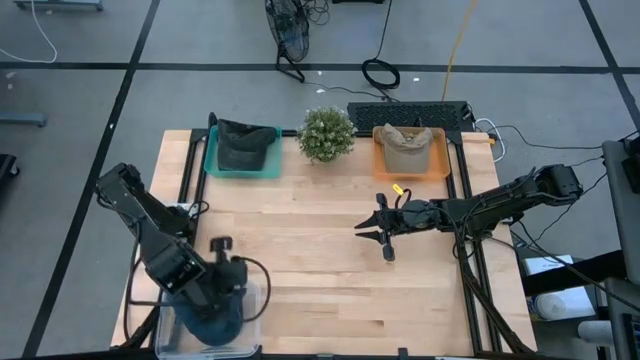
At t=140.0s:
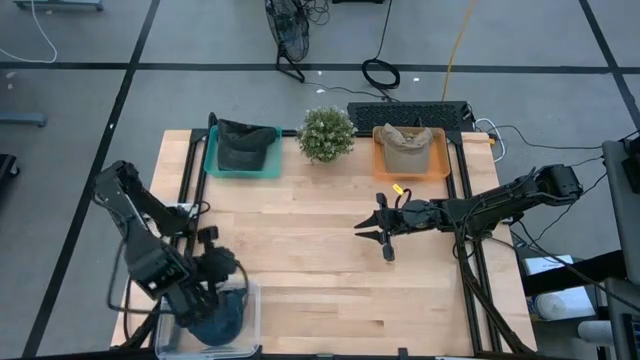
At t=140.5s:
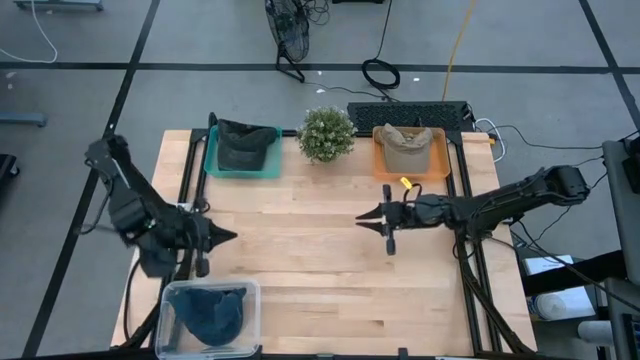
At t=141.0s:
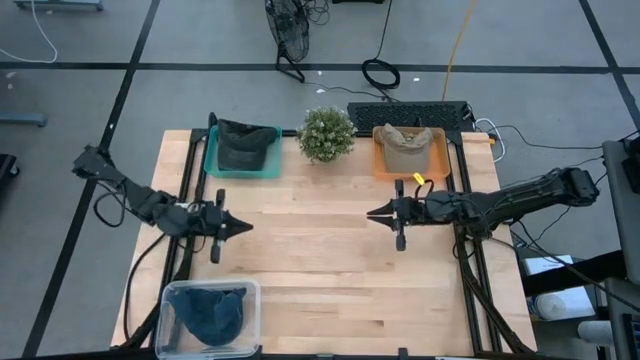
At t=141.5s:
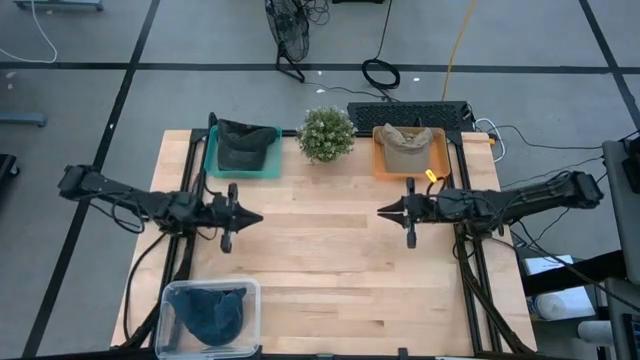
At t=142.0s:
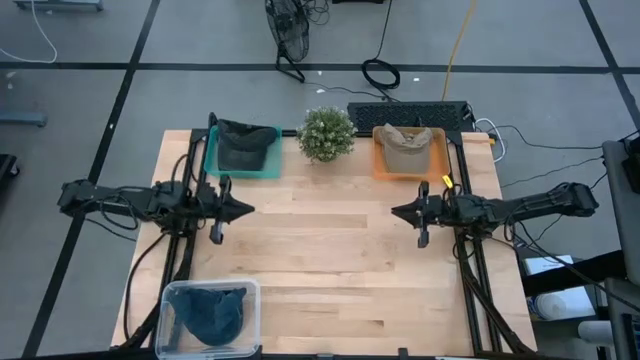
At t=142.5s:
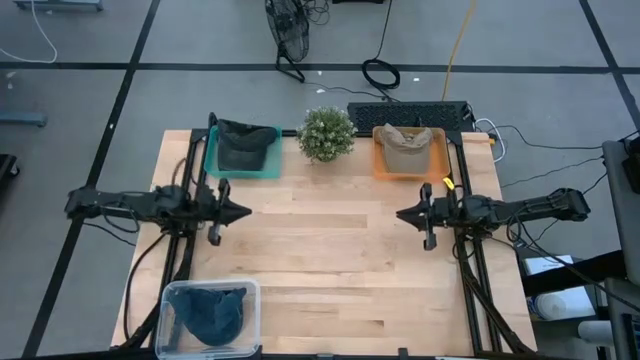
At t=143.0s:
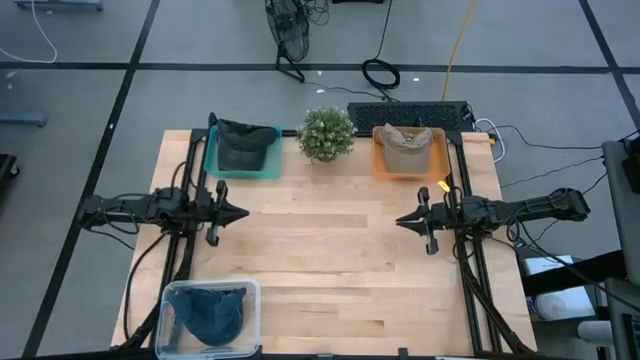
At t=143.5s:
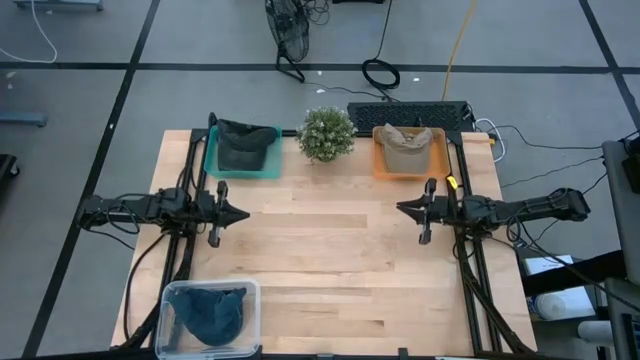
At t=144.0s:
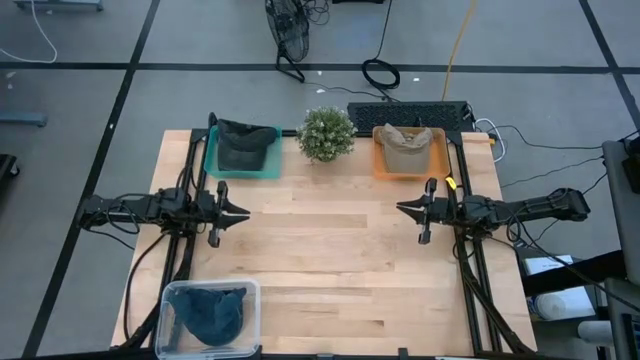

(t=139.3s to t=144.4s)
Task: Pick & Place hat
Return to Home Position

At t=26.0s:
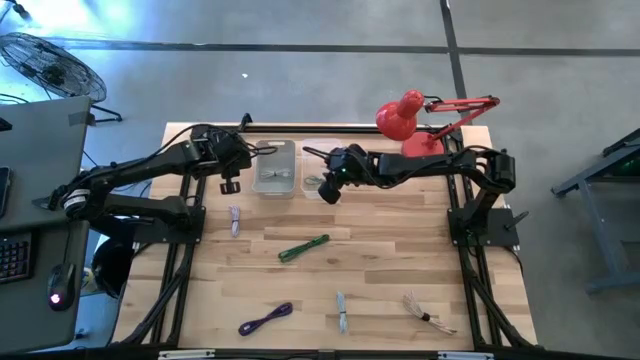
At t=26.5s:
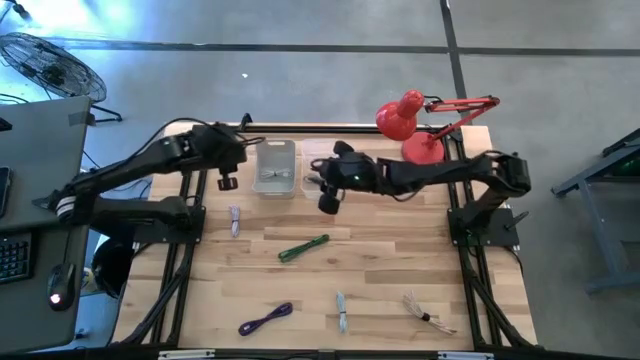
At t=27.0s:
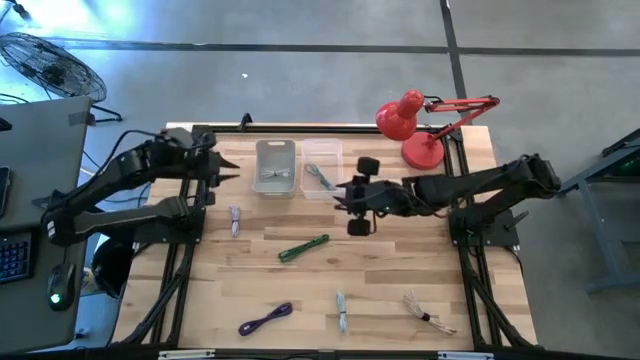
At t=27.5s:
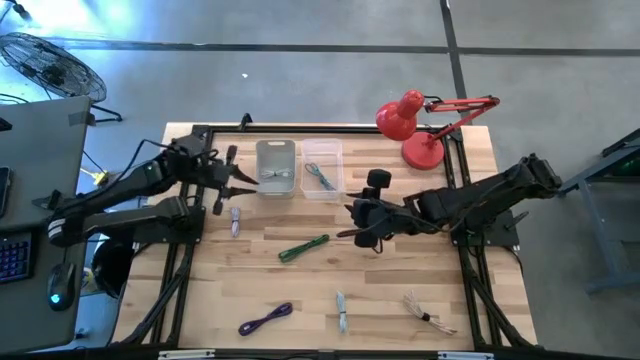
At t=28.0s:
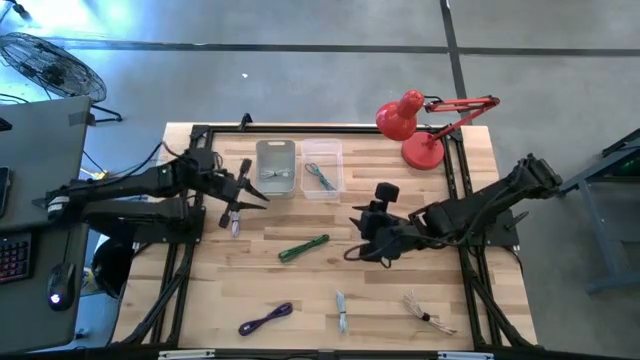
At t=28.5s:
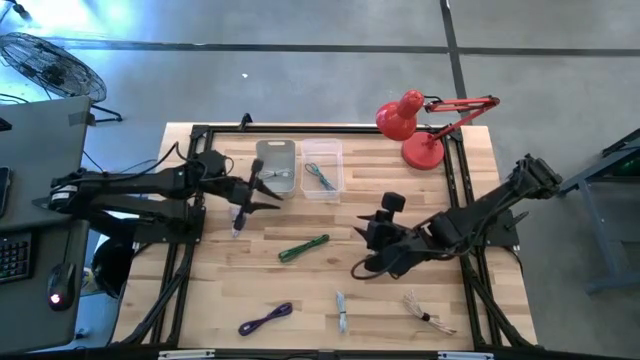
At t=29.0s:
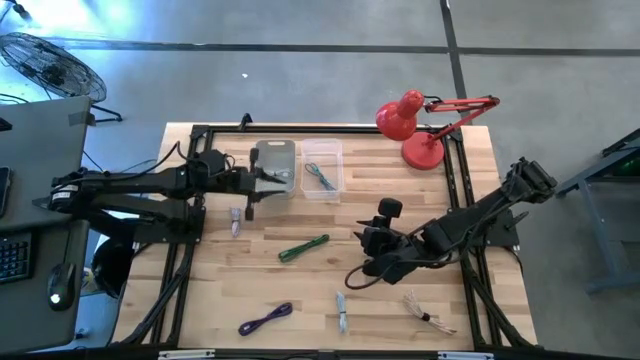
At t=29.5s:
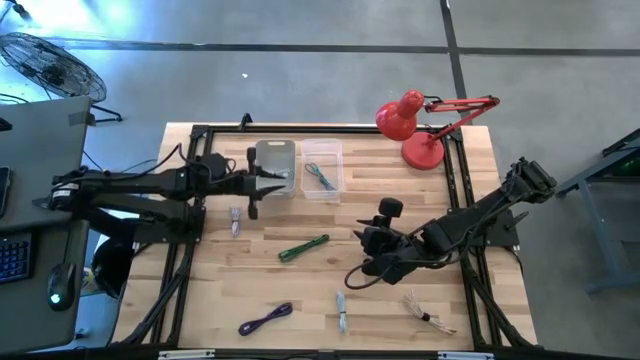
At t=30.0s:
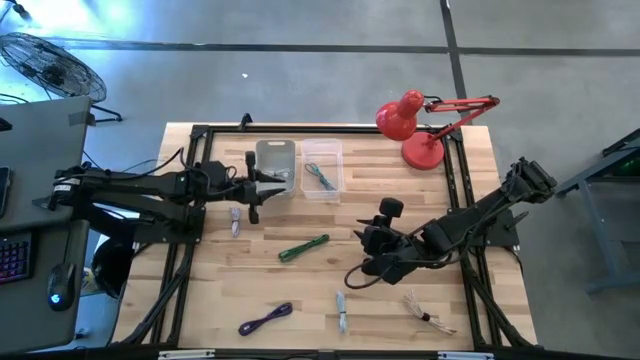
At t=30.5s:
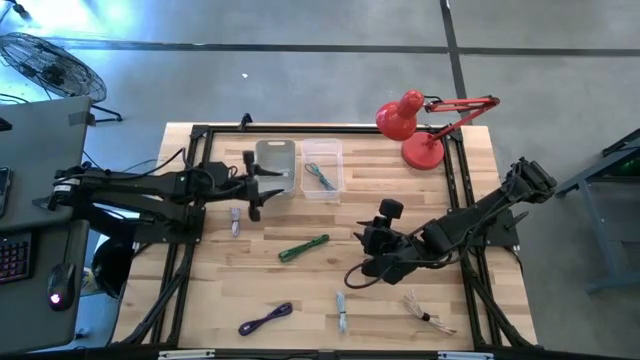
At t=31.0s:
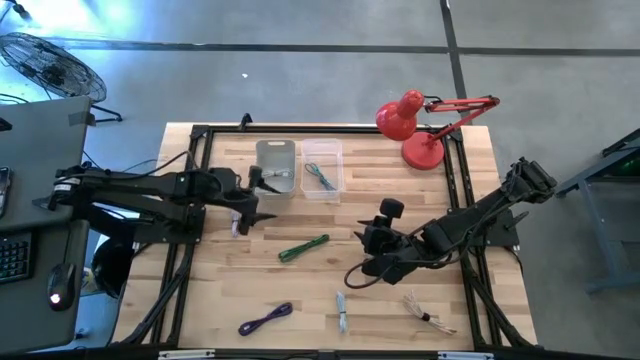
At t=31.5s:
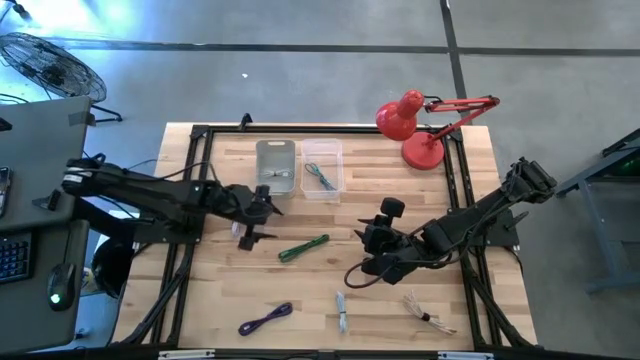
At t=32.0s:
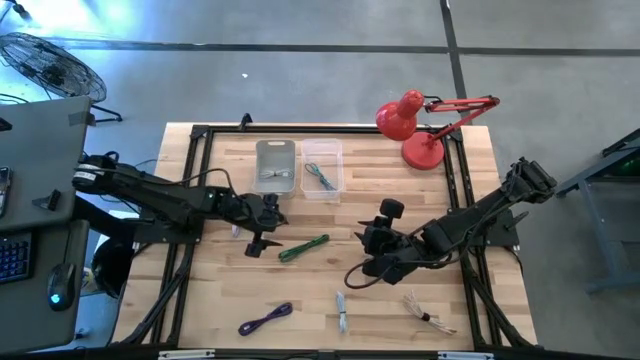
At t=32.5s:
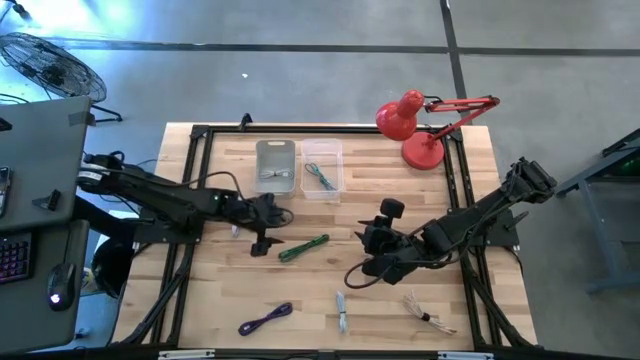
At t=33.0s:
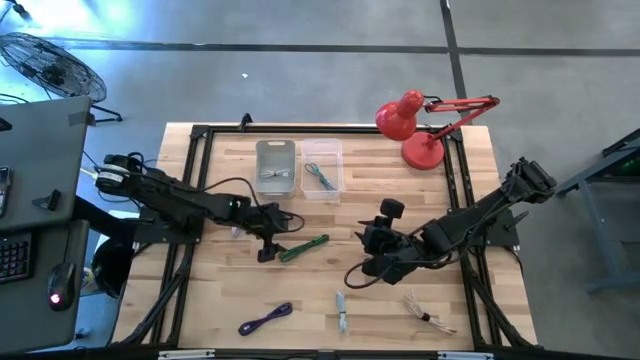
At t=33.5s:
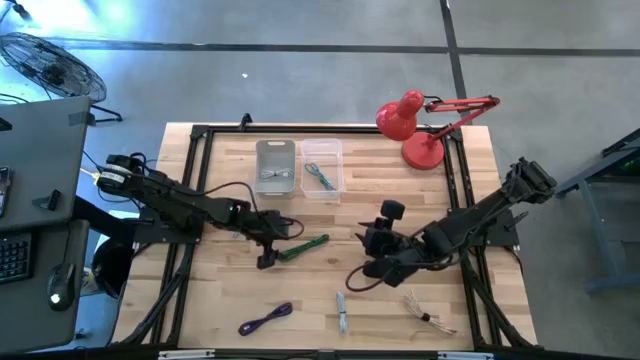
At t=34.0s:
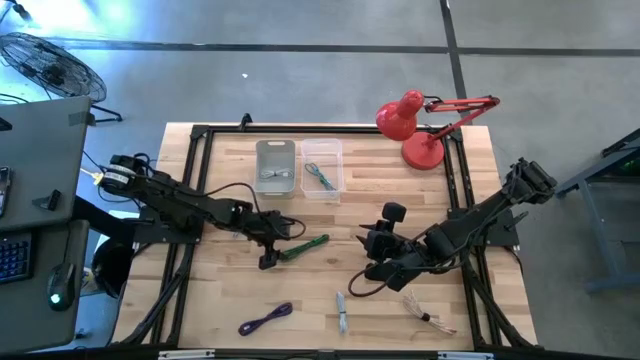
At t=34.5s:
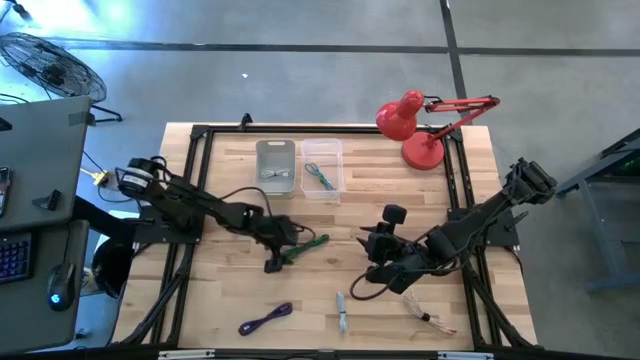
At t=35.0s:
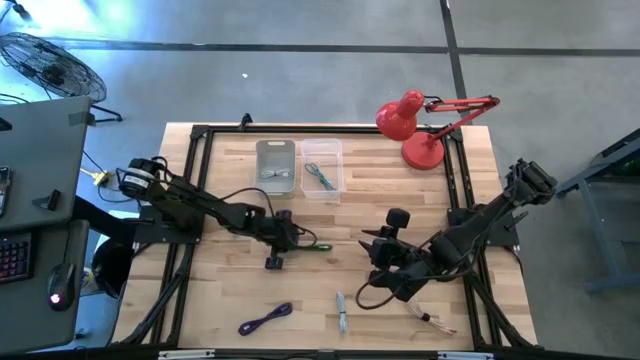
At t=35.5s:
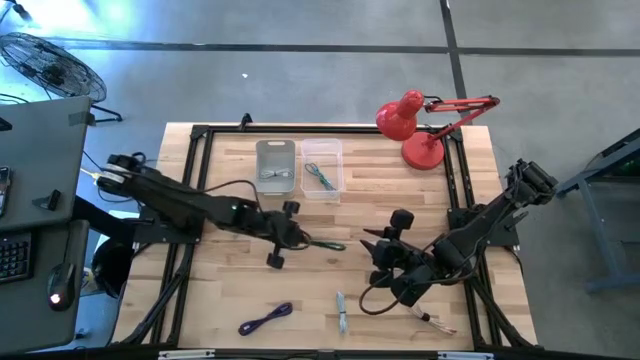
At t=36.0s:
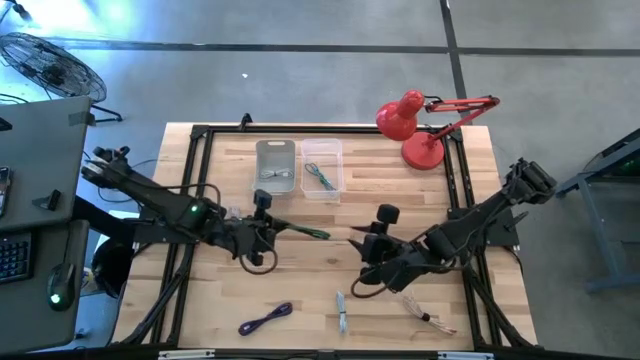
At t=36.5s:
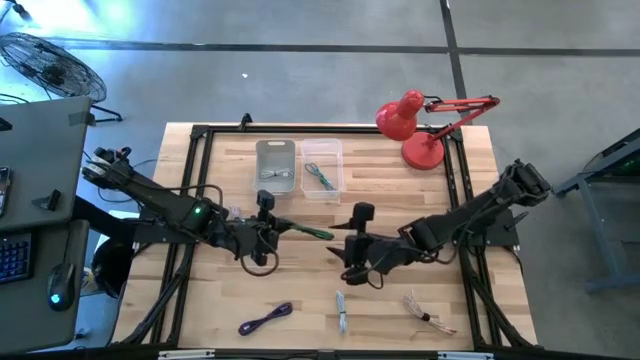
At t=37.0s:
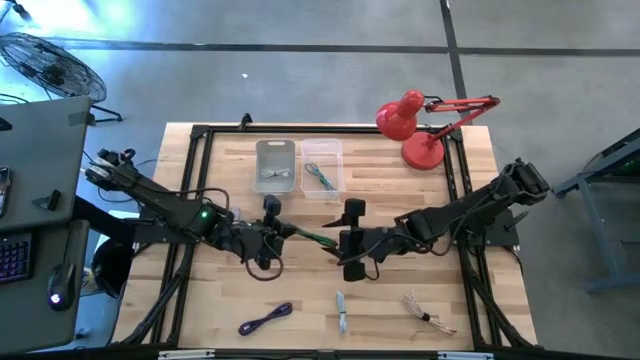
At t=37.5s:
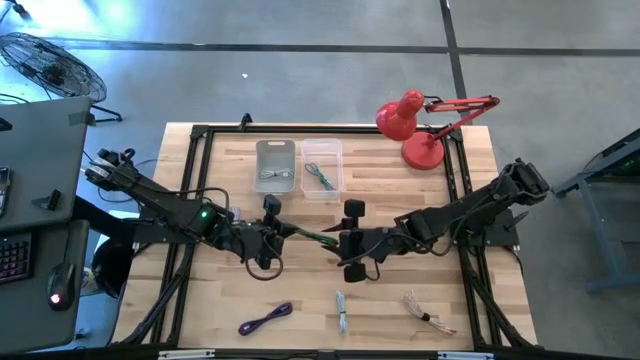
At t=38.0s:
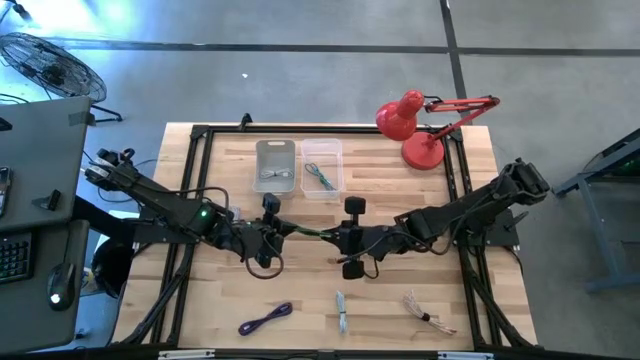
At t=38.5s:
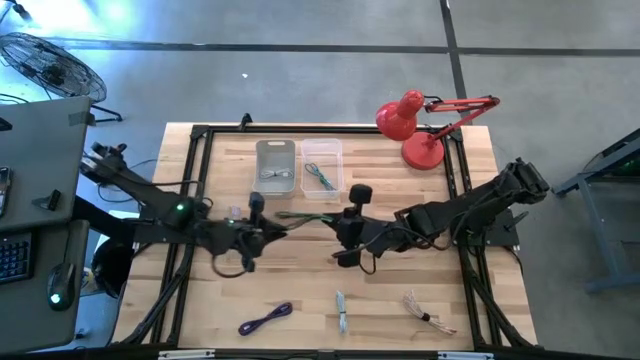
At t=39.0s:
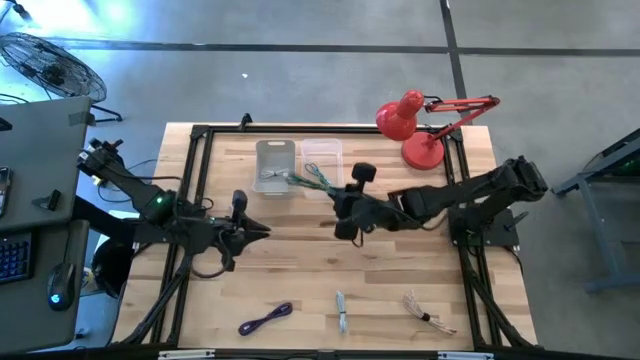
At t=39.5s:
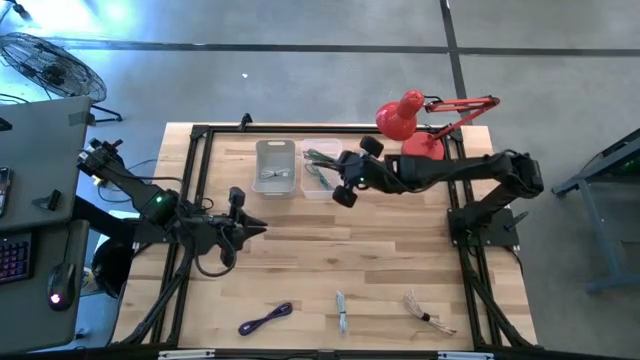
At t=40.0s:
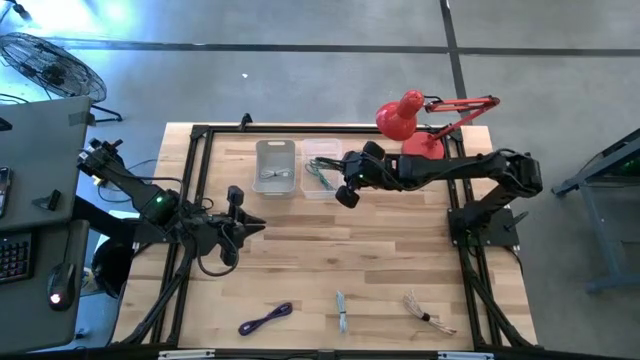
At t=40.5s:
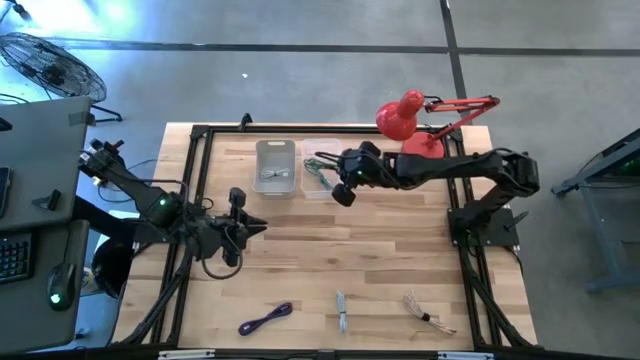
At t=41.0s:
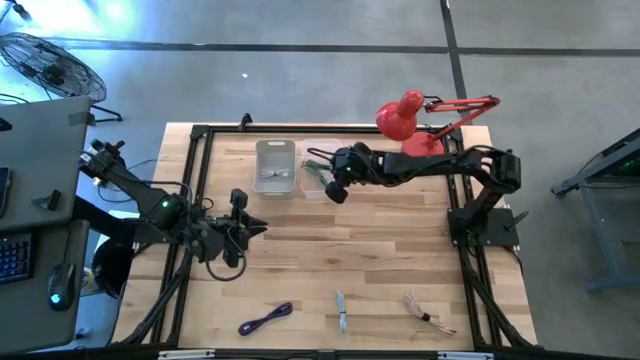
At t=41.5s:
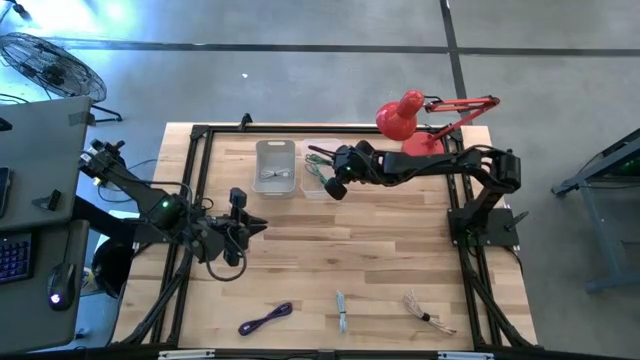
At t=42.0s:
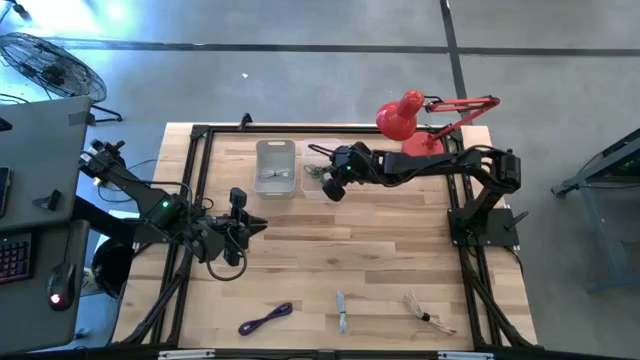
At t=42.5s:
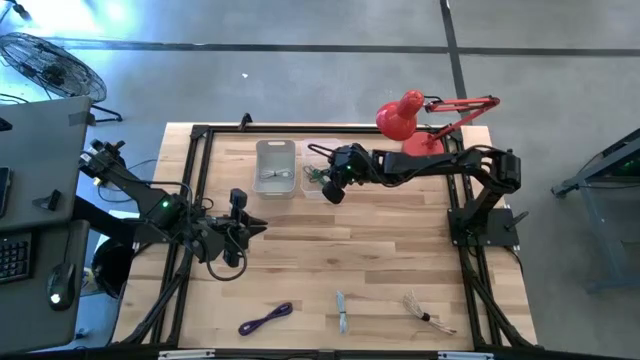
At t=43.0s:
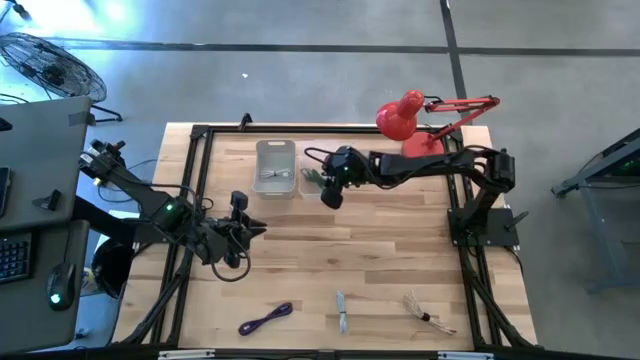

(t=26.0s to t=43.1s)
Task: Pick & Place USB Port
Put the green patterned charger cable into the white bin
